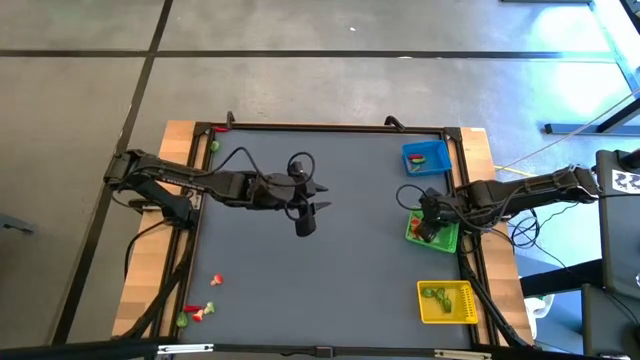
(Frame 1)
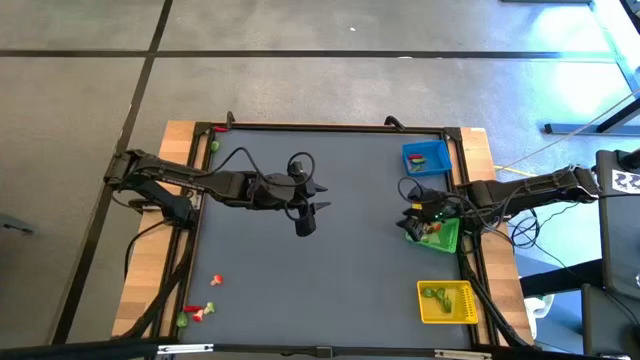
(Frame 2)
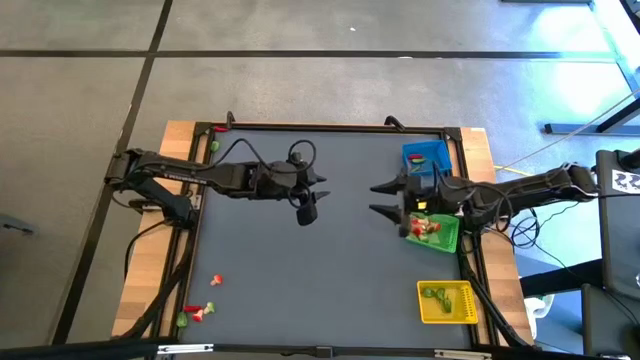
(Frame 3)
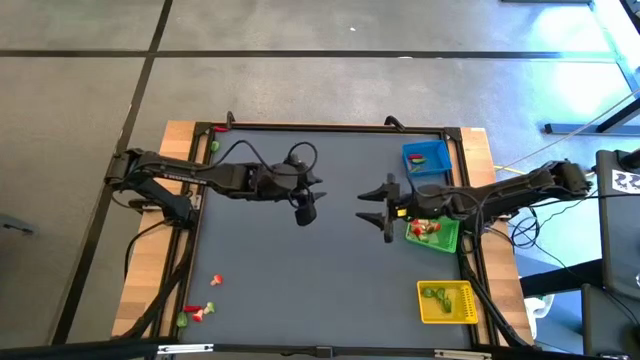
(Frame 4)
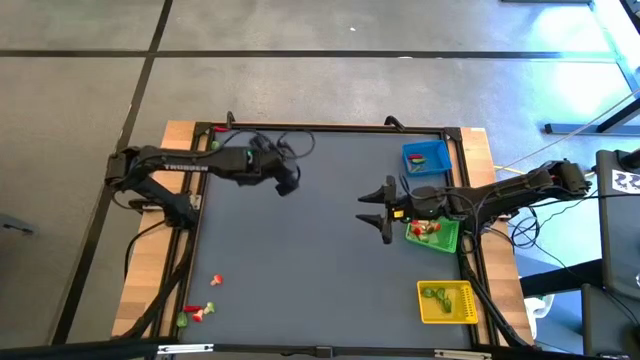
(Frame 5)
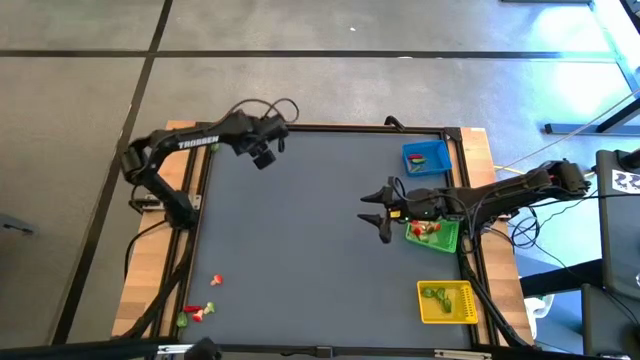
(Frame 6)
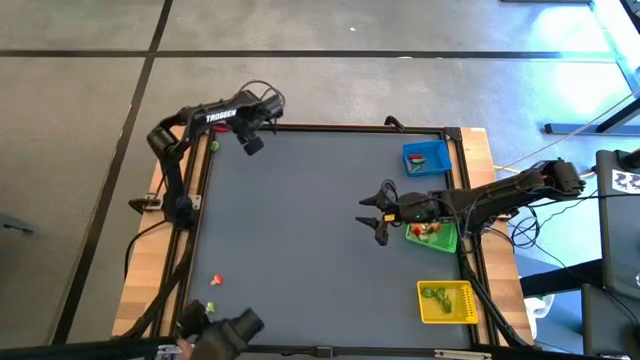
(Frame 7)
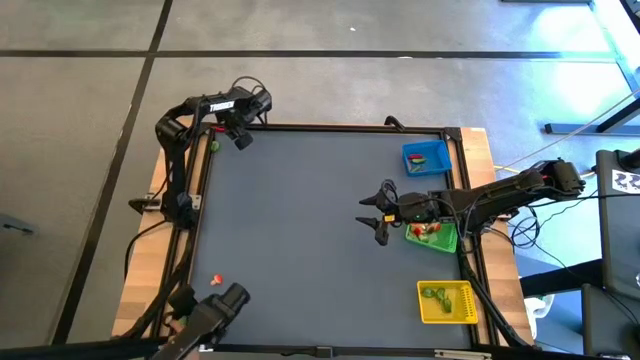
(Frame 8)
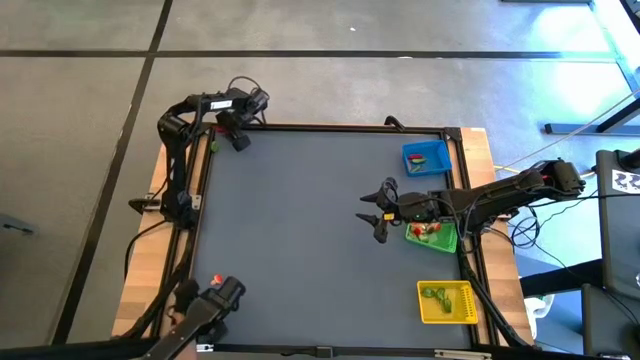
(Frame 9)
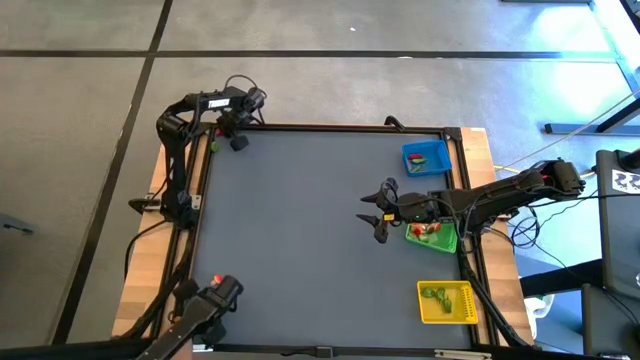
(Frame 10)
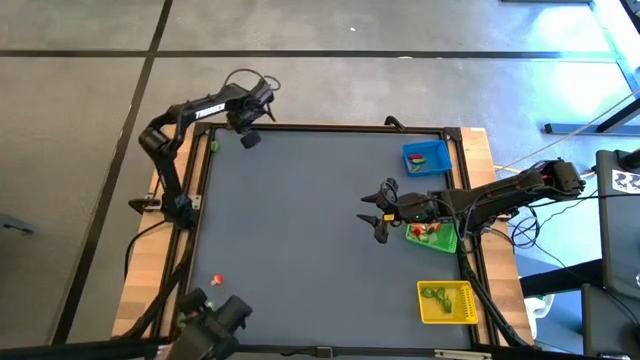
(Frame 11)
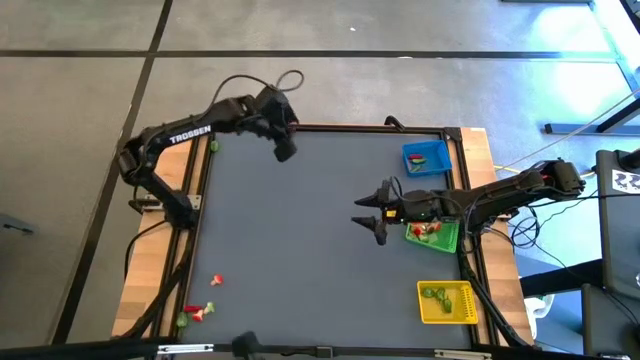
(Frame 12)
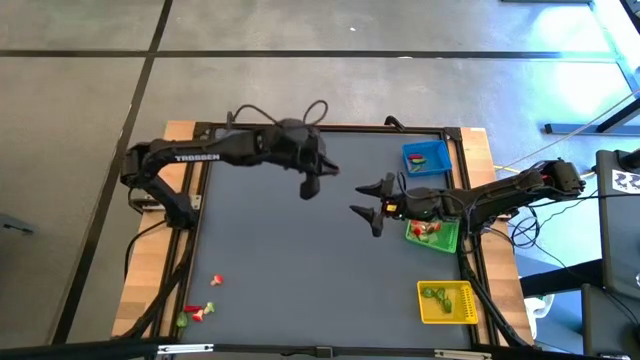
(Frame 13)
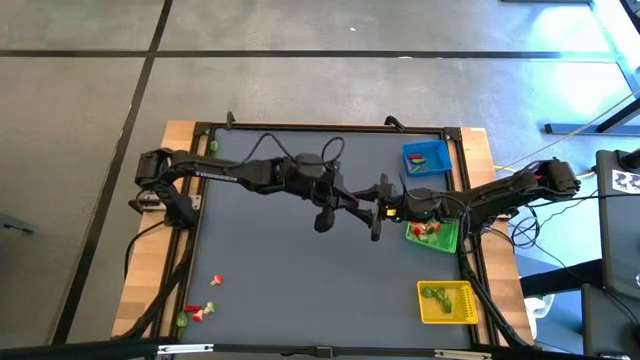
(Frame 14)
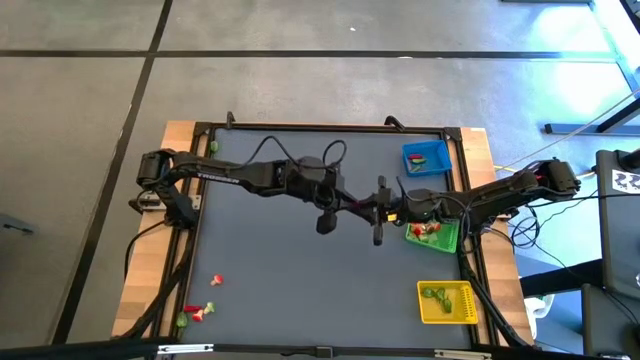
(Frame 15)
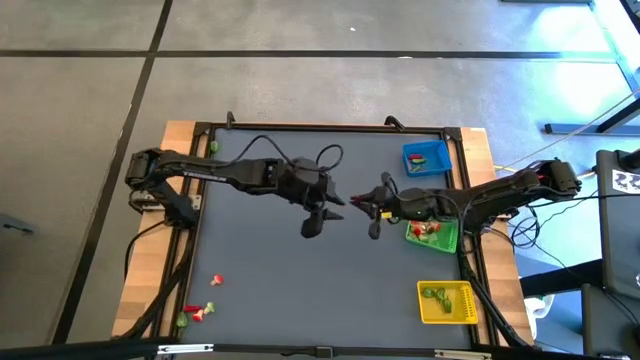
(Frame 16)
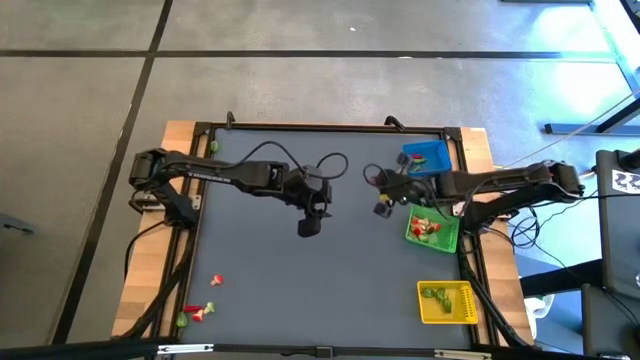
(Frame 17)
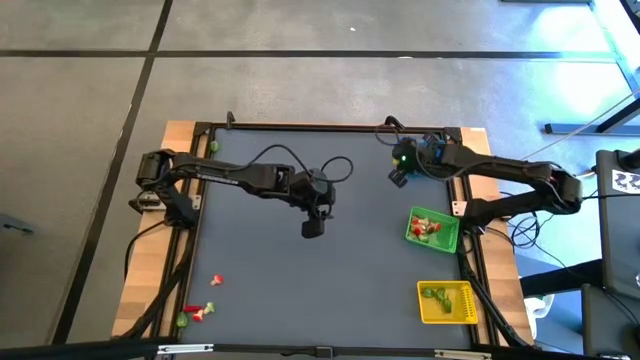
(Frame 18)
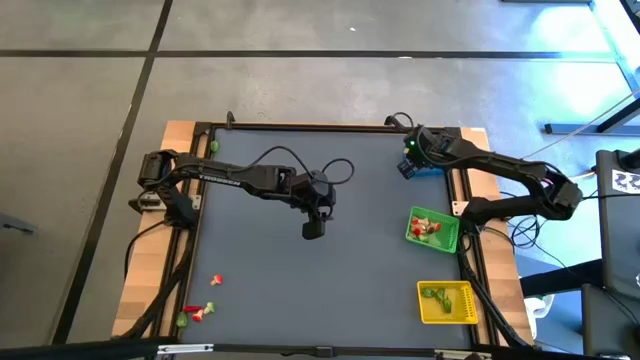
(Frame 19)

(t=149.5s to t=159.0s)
Task: Sort produce into baskets
Put the red chili pepper into the blue basket

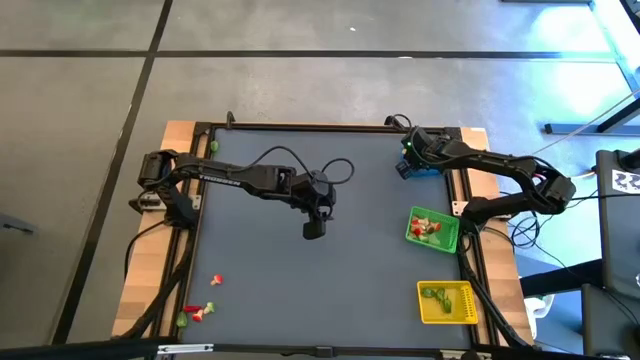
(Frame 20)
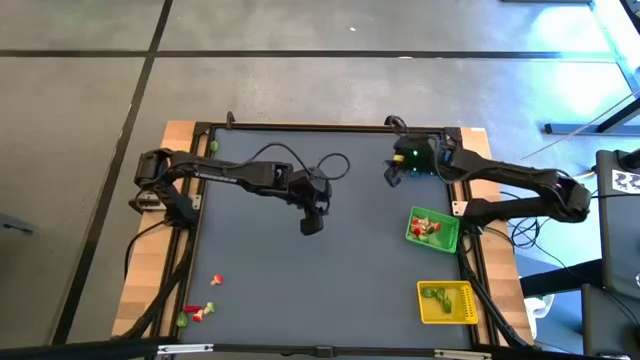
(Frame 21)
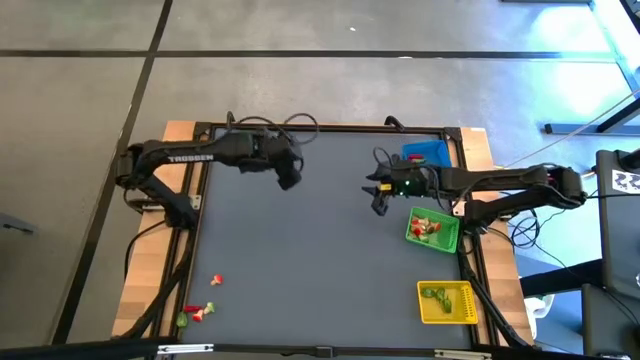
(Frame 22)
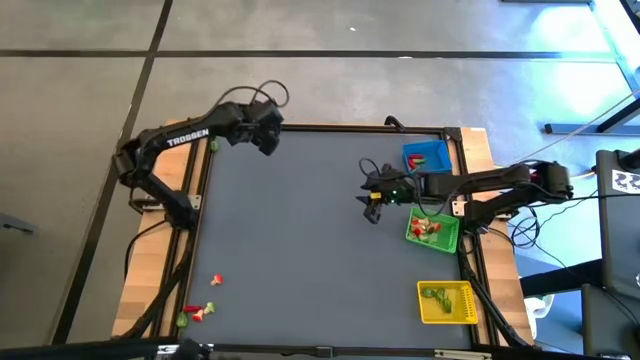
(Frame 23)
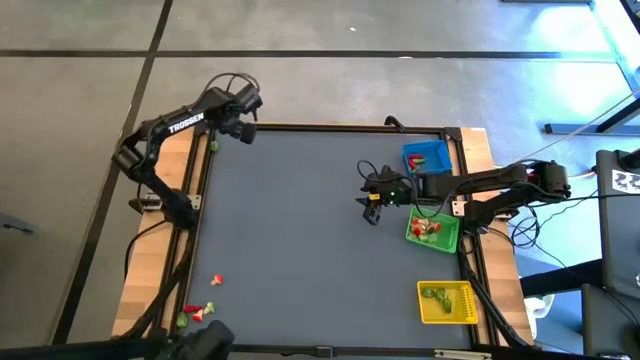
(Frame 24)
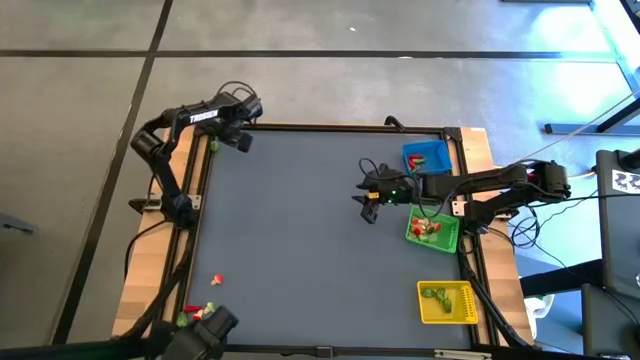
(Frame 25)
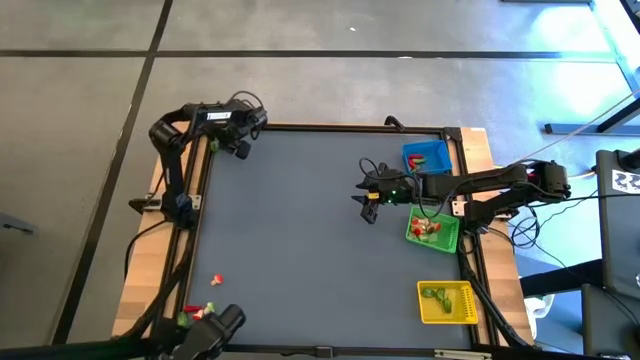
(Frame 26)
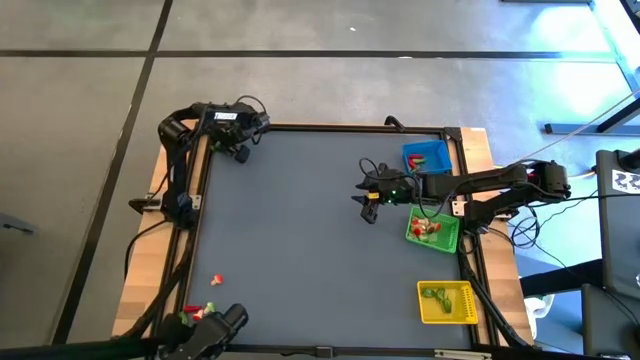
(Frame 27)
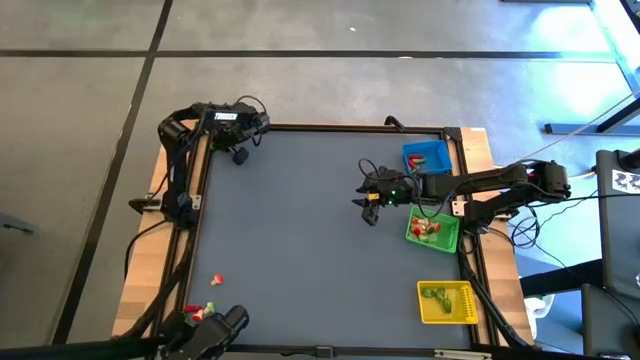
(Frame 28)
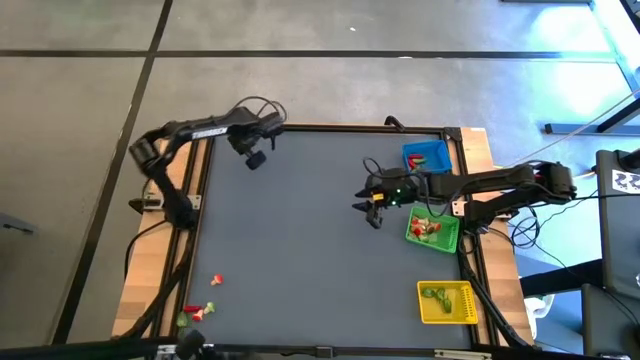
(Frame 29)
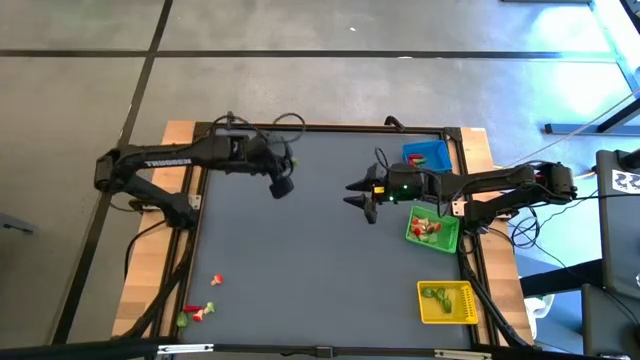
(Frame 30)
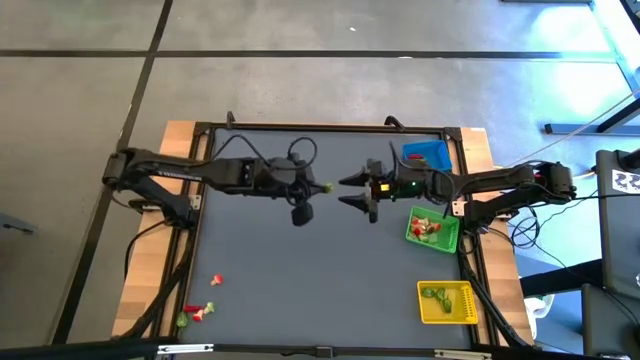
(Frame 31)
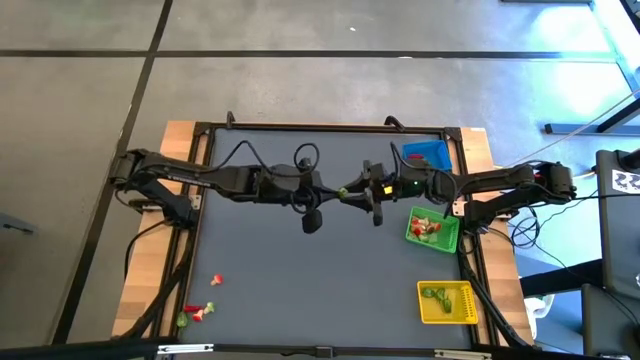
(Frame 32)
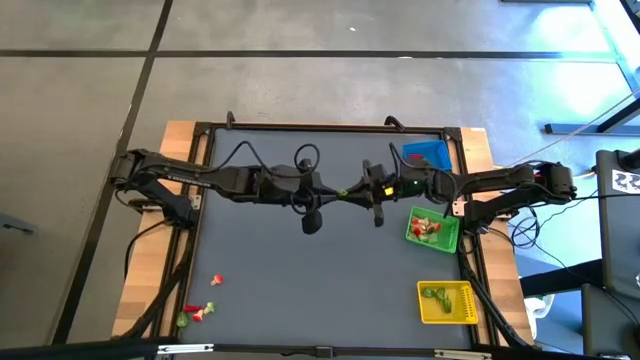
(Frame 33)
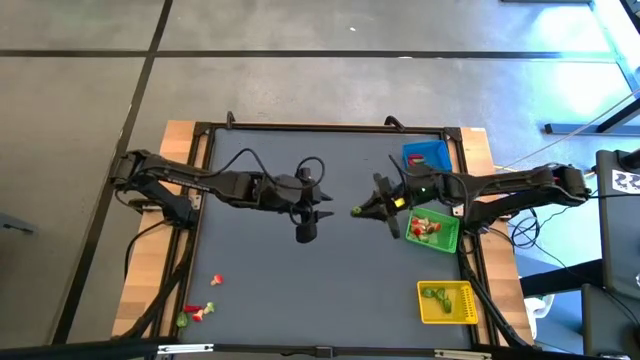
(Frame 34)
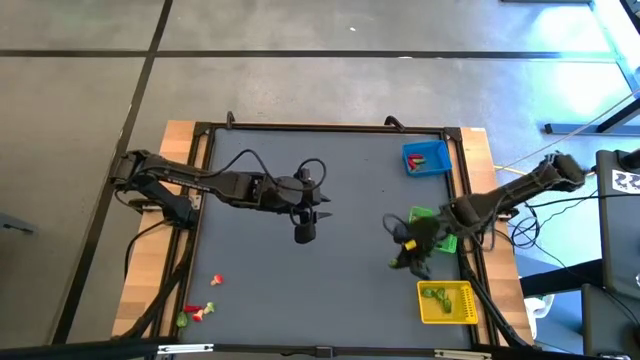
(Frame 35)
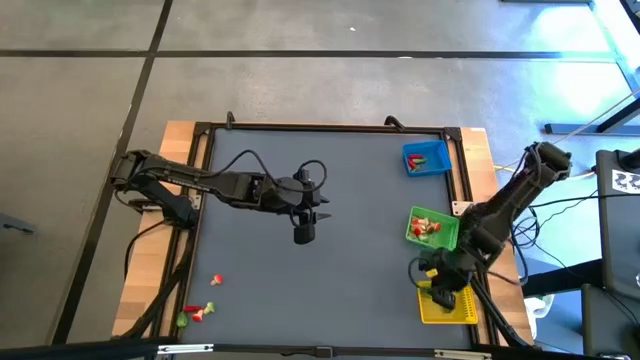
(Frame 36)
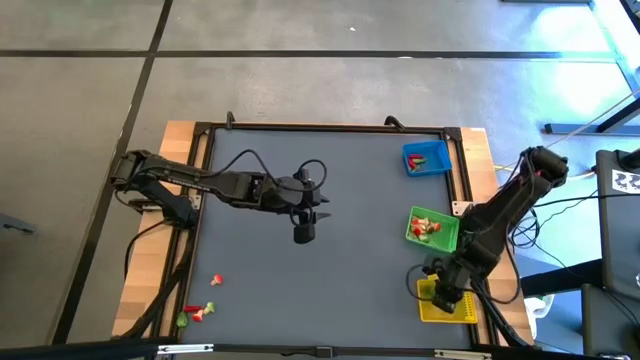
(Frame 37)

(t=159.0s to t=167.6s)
Put the capsicum into the yellow basket

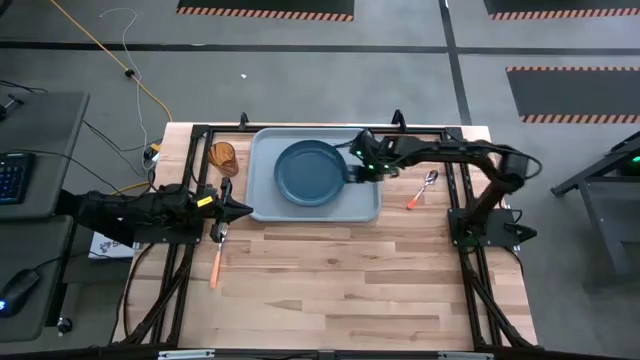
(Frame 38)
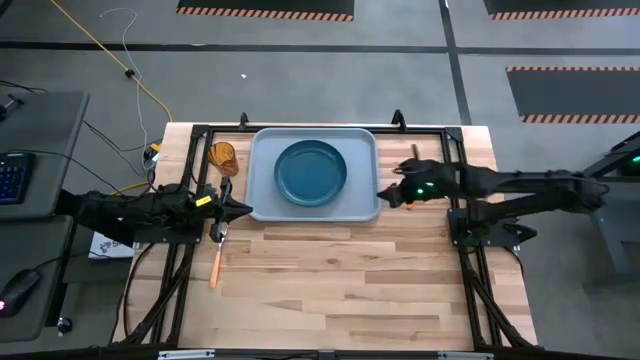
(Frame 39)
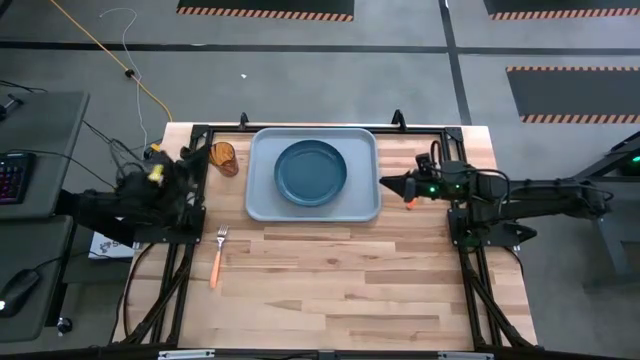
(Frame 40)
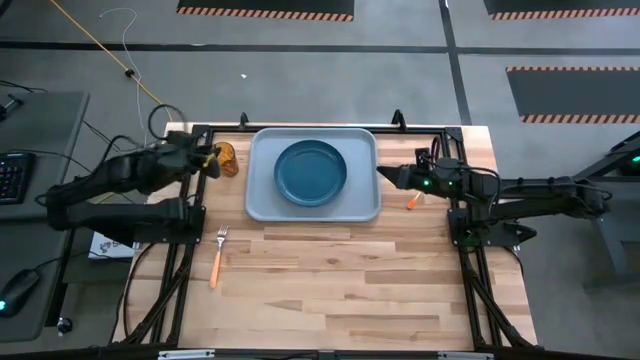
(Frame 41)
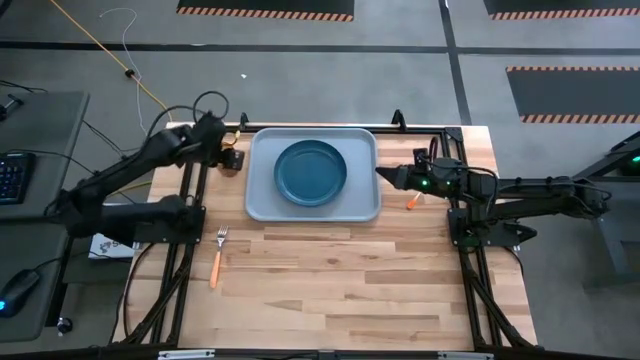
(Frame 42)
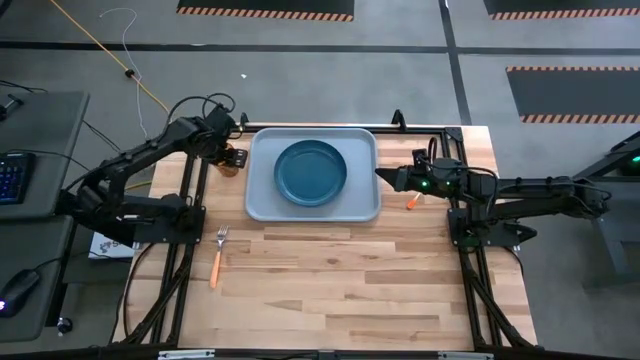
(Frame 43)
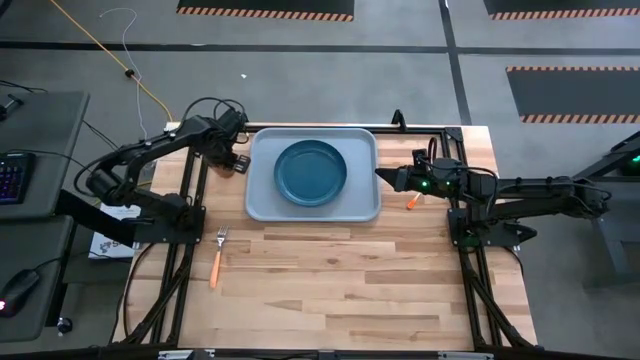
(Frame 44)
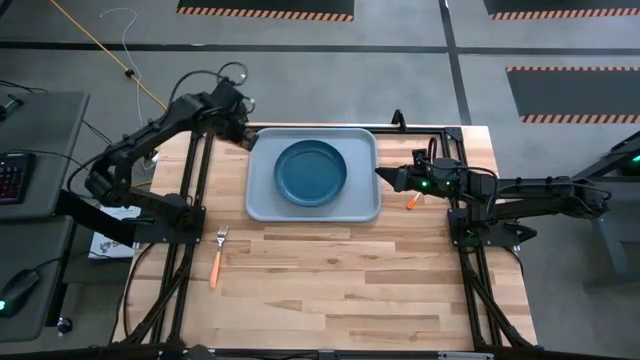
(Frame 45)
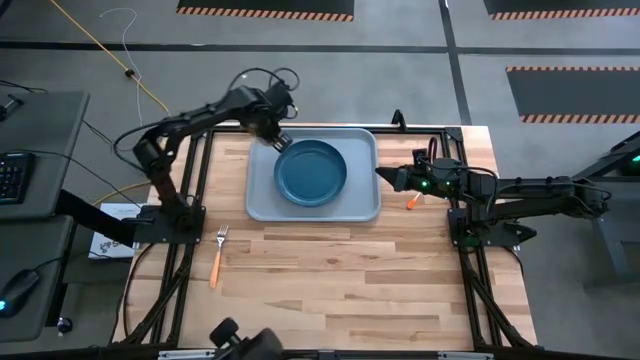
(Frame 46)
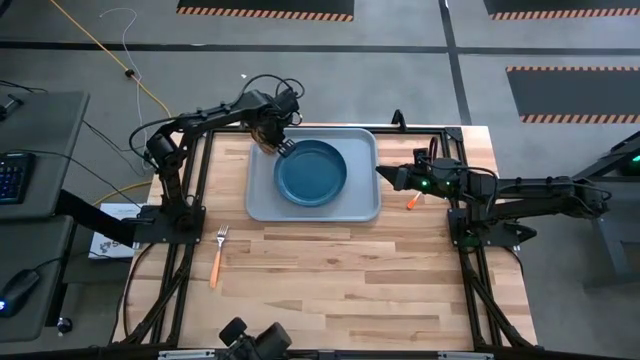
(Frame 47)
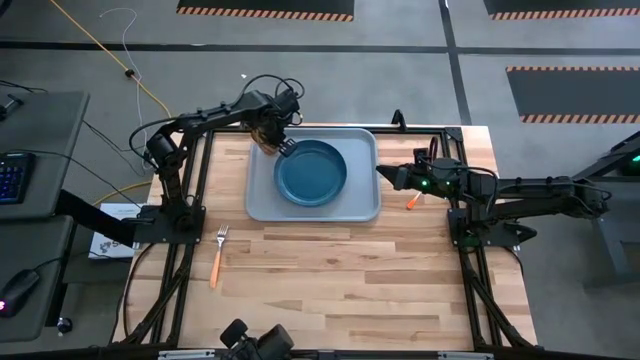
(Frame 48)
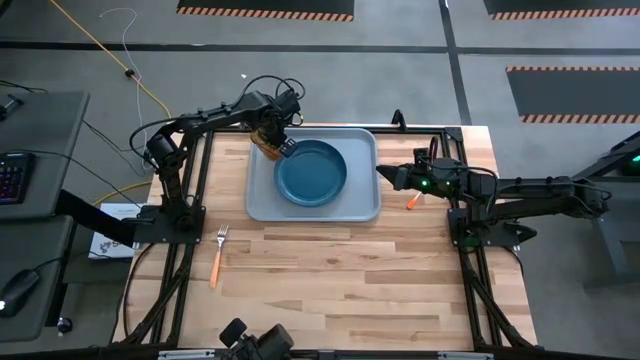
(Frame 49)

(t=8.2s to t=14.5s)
Task: Pick and place plate/cup/fork/spoon on tray
Put the orange glass cup on top of the plate on the tray
